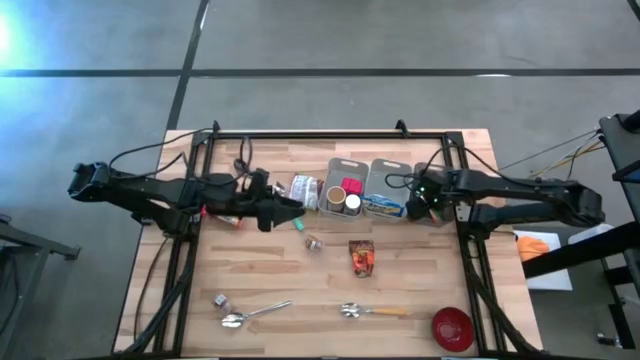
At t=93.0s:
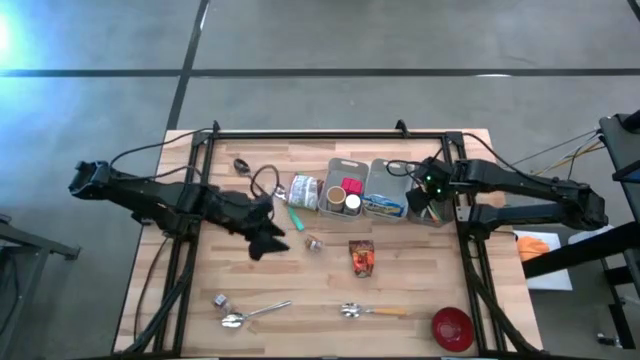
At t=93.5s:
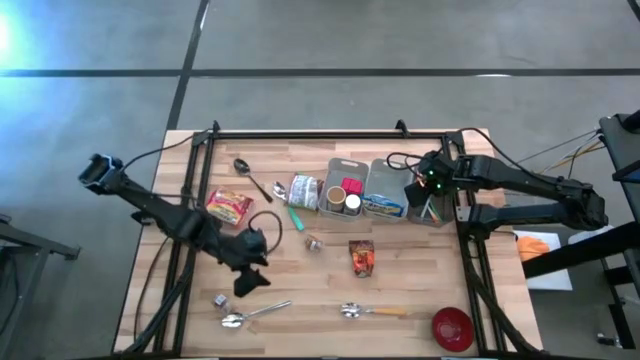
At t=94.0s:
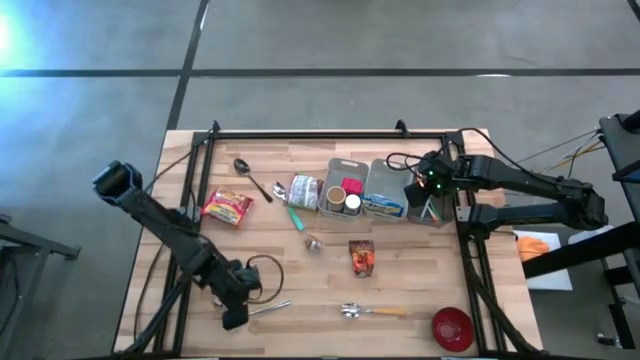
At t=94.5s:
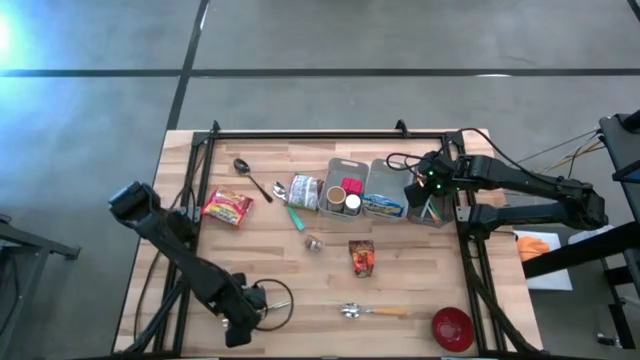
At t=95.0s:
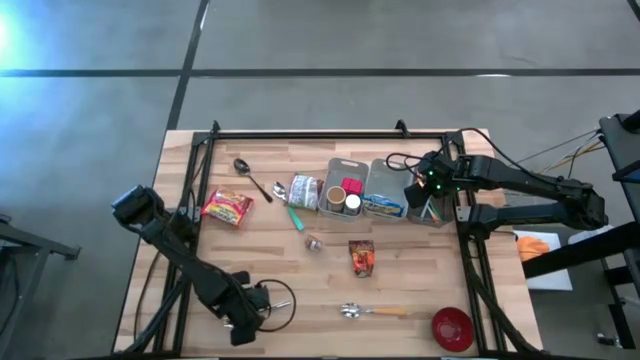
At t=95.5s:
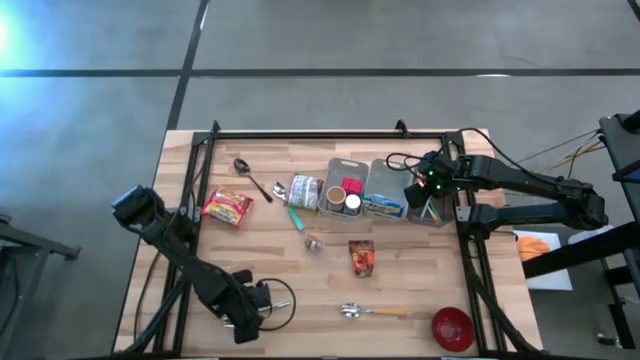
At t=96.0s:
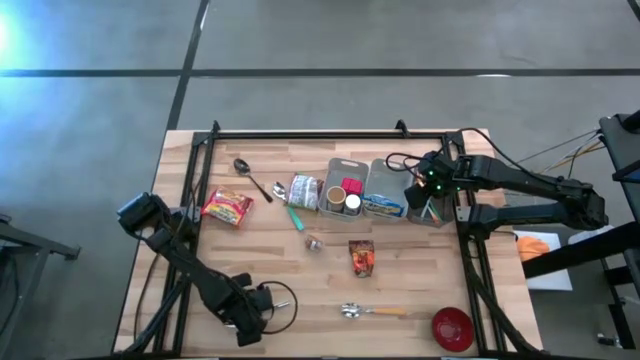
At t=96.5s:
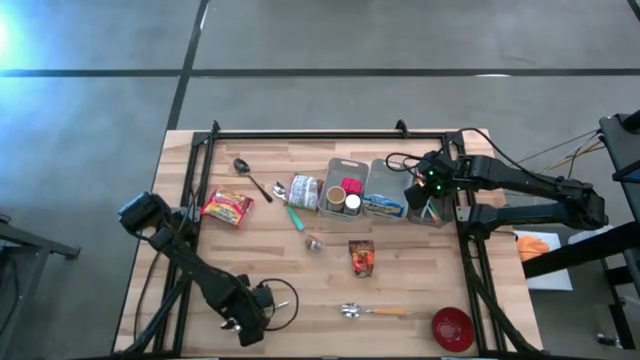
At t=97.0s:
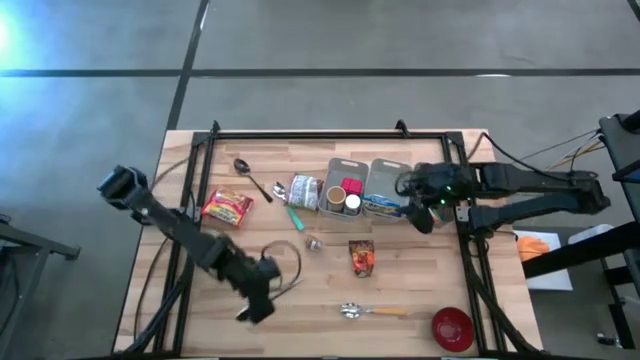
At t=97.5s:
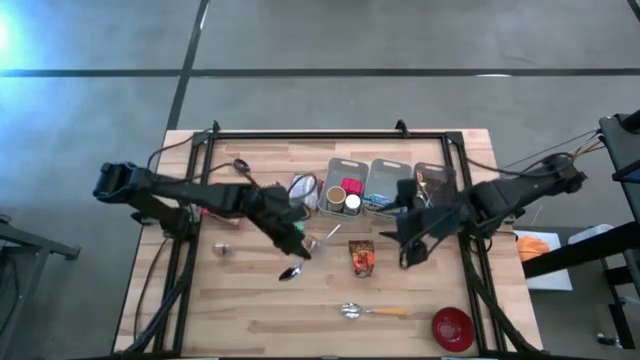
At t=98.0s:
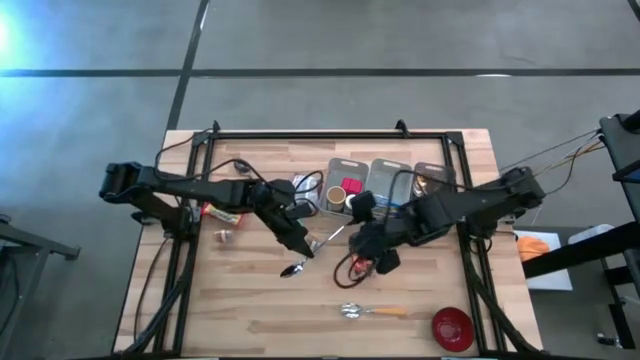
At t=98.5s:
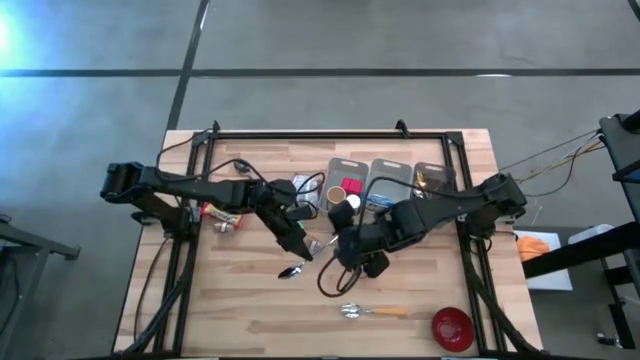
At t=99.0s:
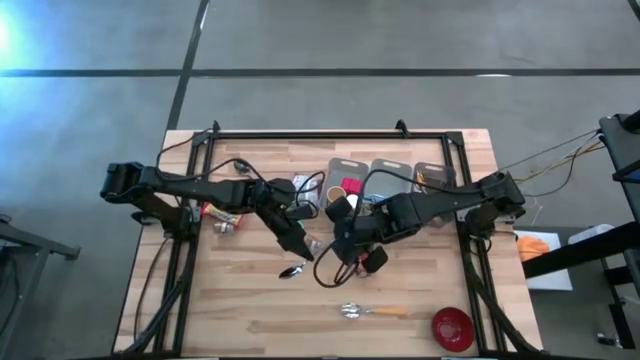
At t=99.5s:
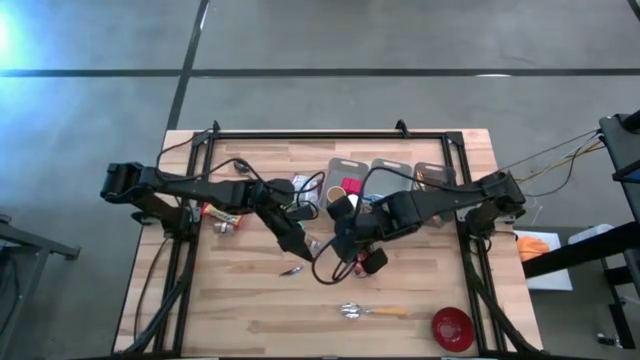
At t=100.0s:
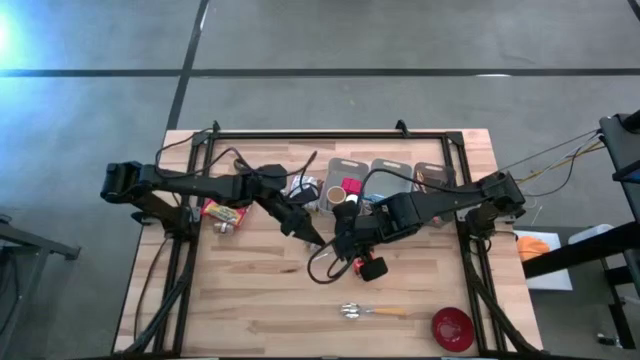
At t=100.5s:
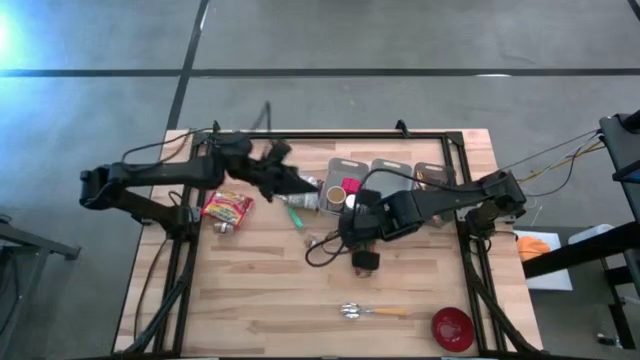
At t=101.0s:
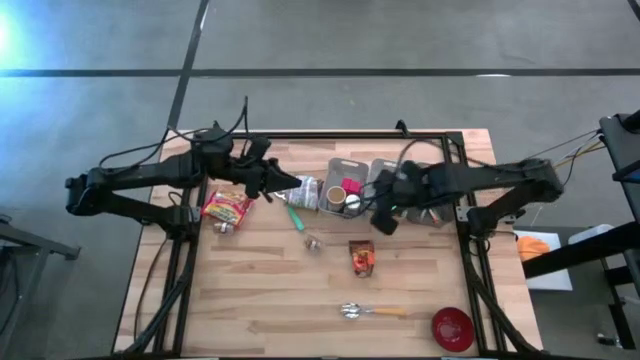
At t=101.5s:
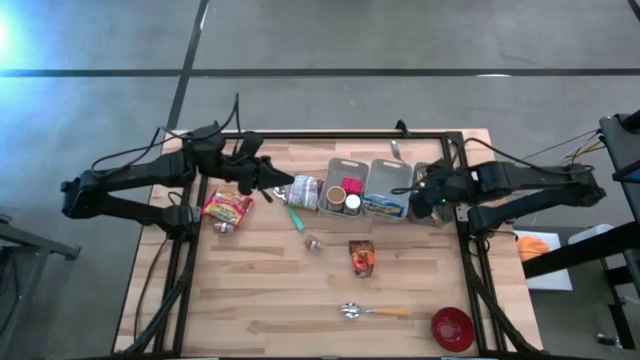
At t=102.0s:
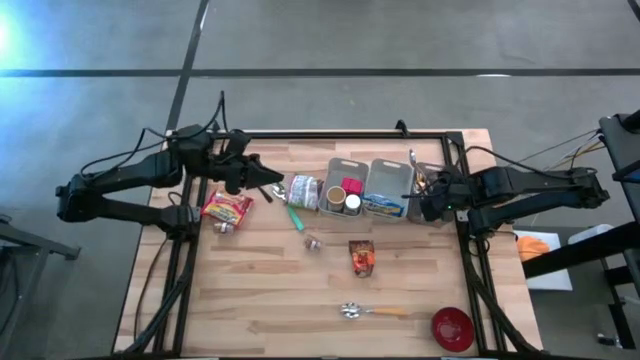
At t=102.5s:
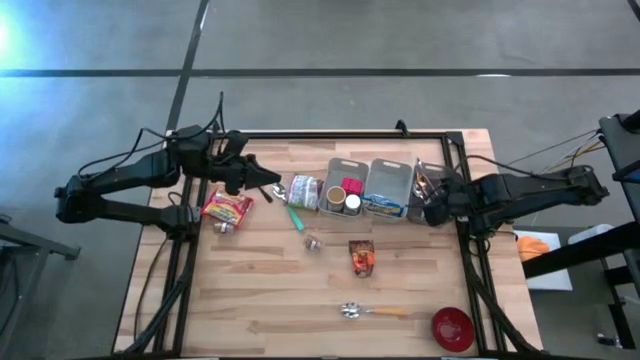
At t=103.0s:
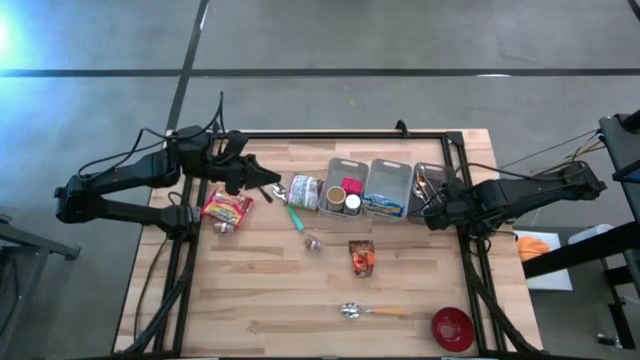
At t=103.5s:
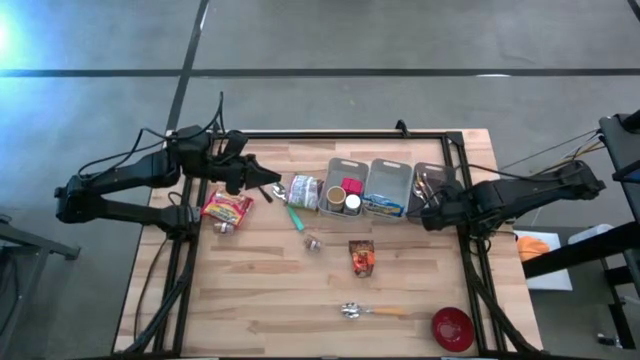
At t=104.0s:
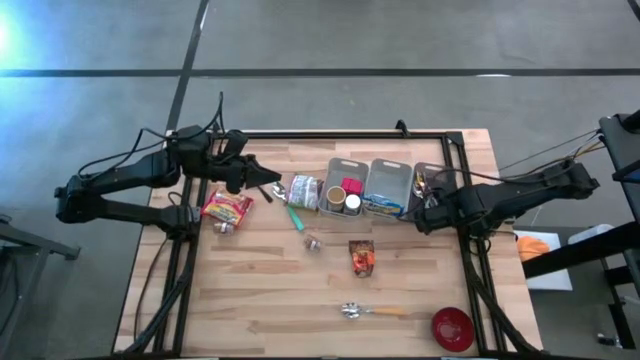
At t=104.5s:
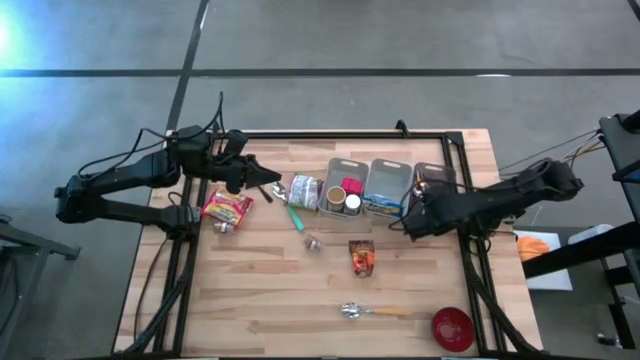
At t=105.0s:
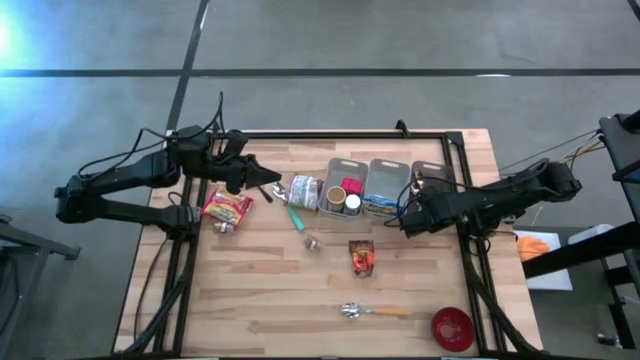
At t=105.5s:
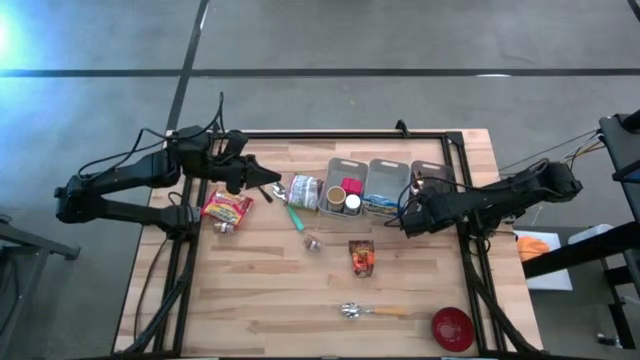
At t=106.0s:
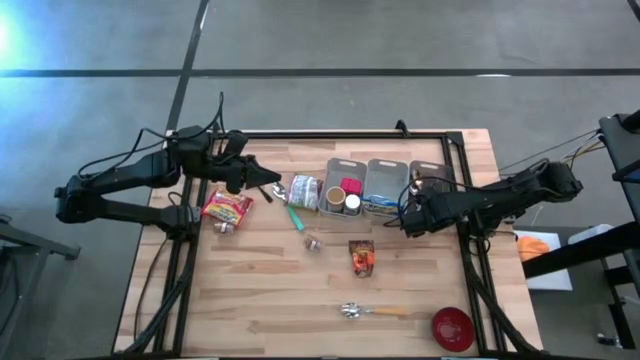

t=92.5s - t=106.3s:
Put the silver spoon into the black bin
